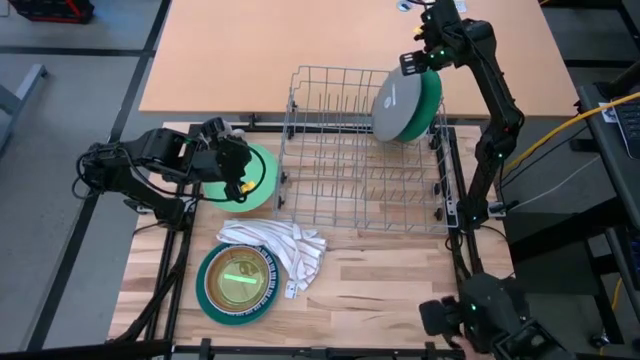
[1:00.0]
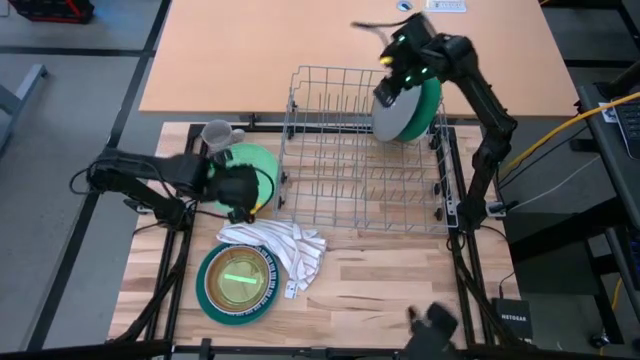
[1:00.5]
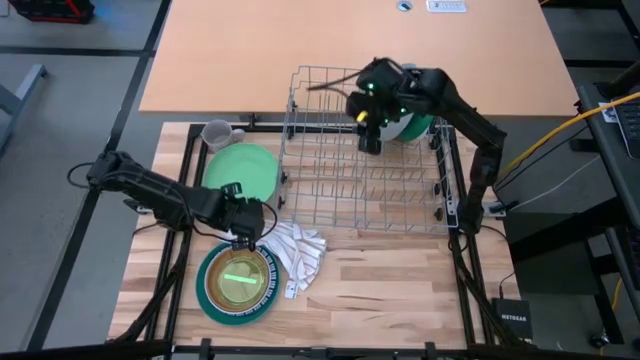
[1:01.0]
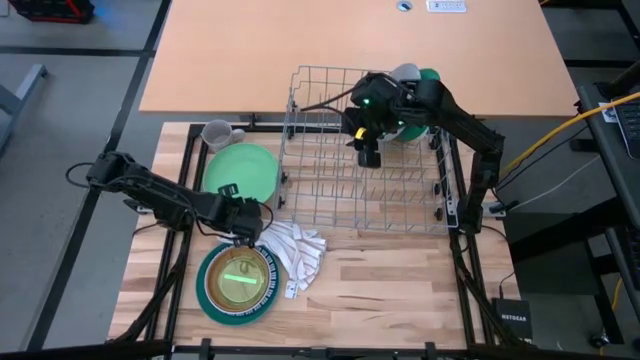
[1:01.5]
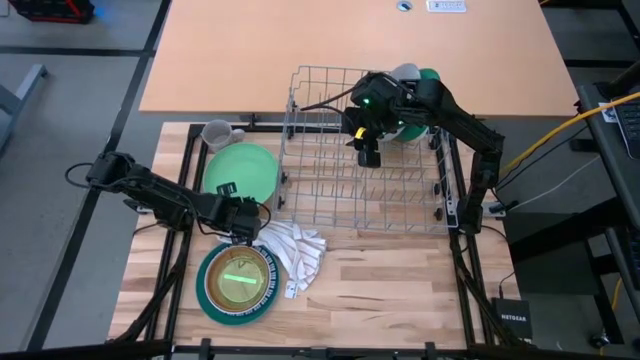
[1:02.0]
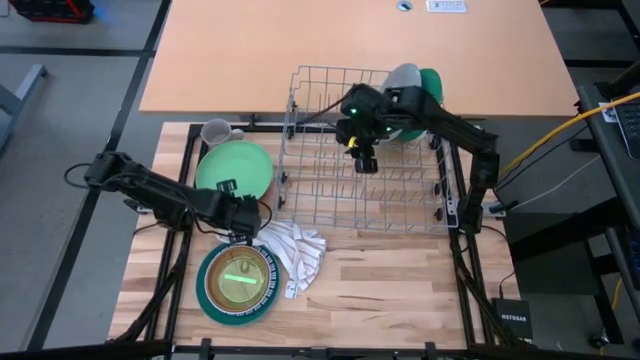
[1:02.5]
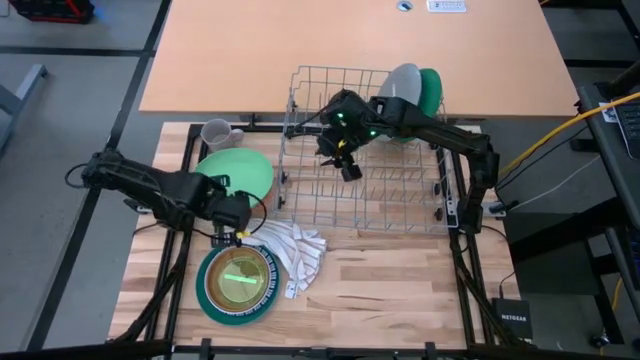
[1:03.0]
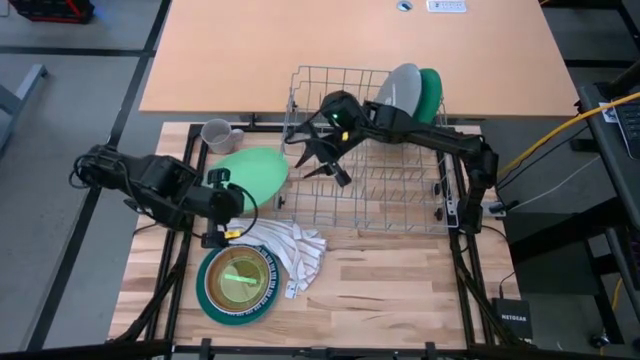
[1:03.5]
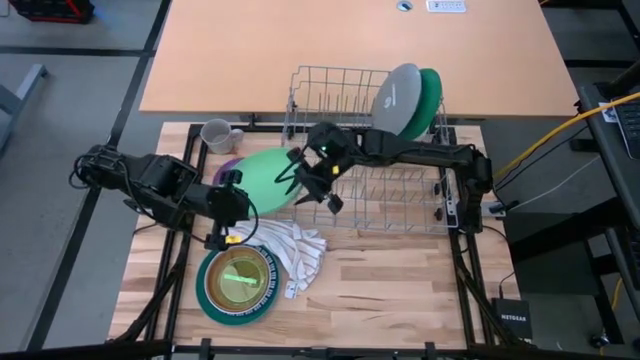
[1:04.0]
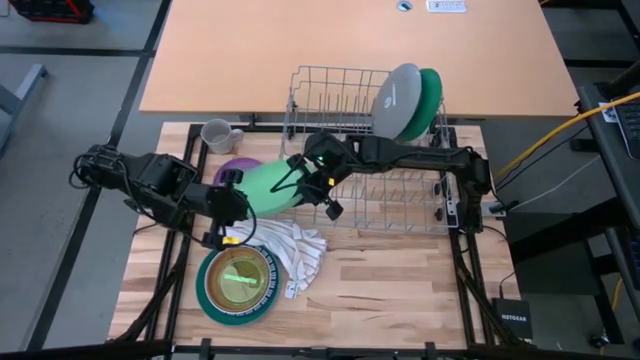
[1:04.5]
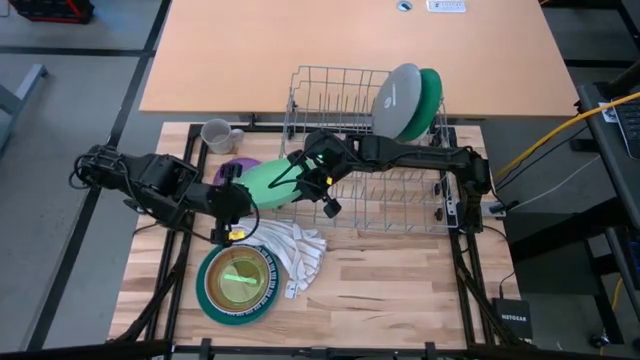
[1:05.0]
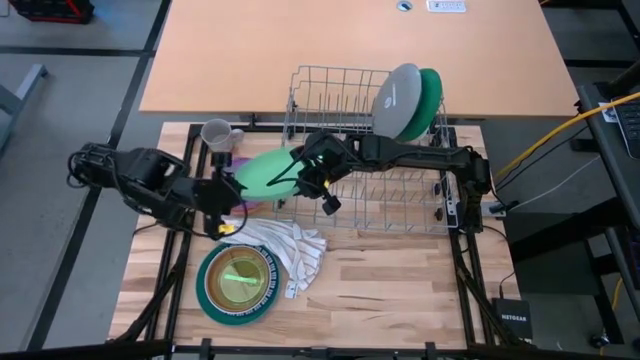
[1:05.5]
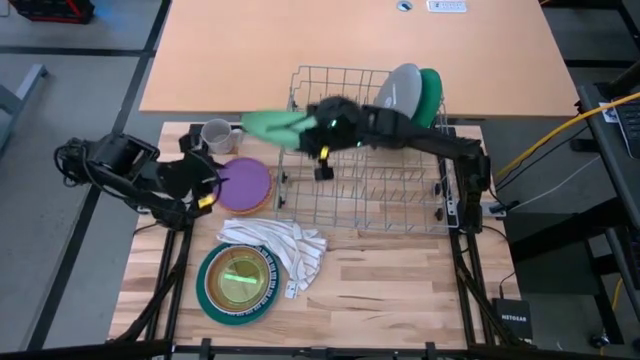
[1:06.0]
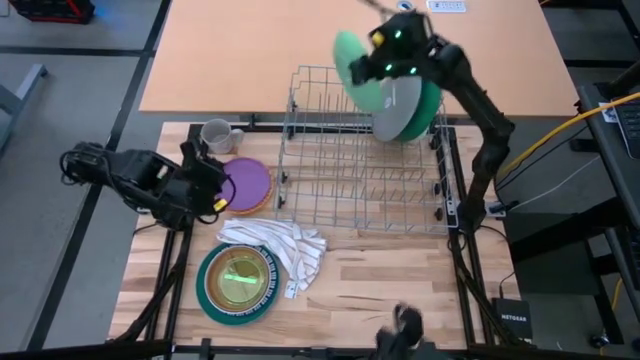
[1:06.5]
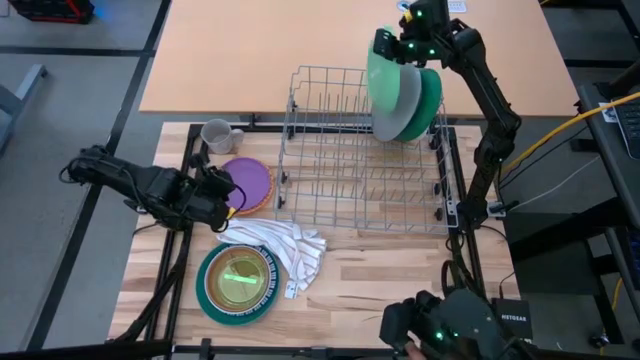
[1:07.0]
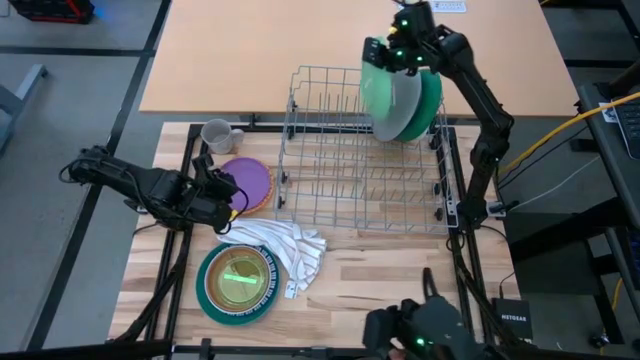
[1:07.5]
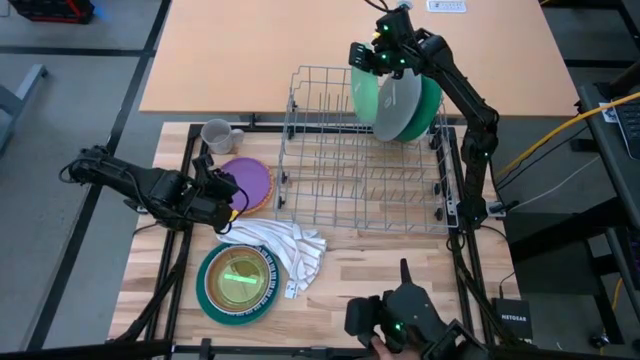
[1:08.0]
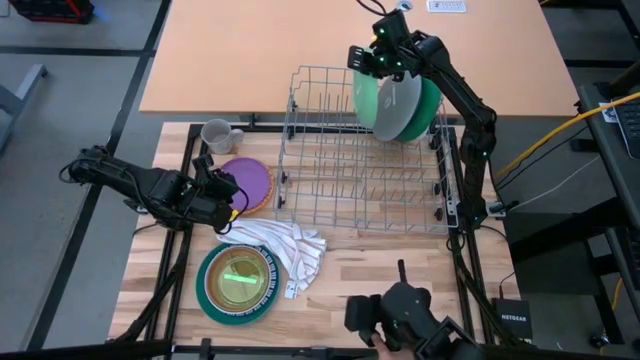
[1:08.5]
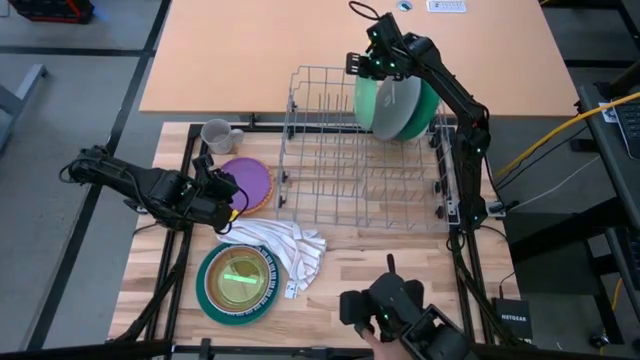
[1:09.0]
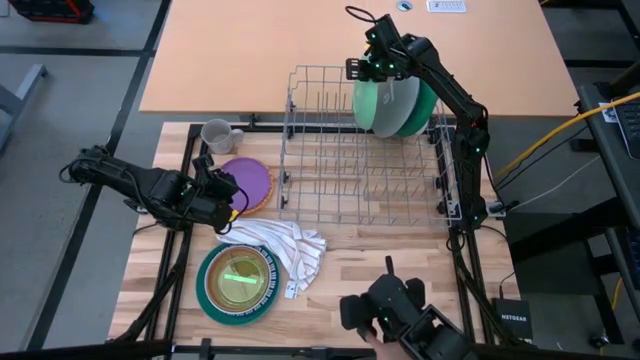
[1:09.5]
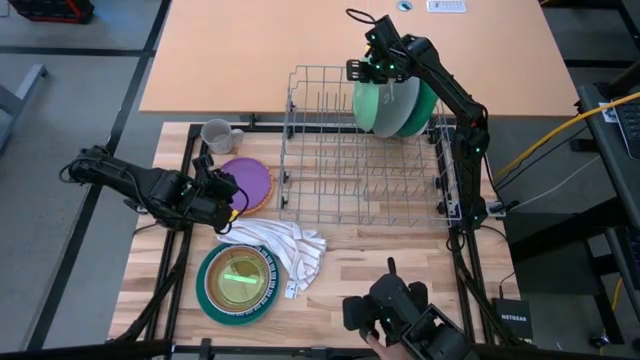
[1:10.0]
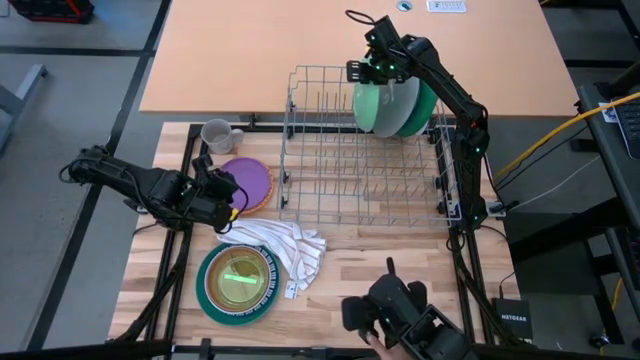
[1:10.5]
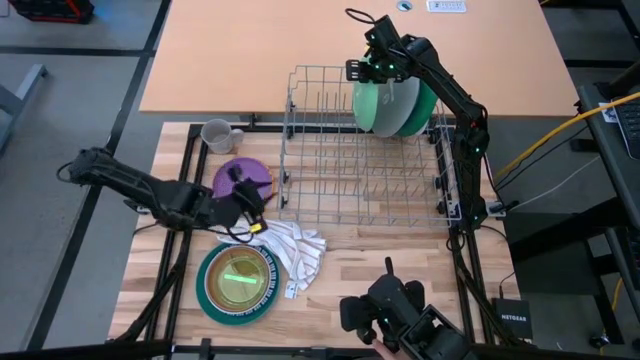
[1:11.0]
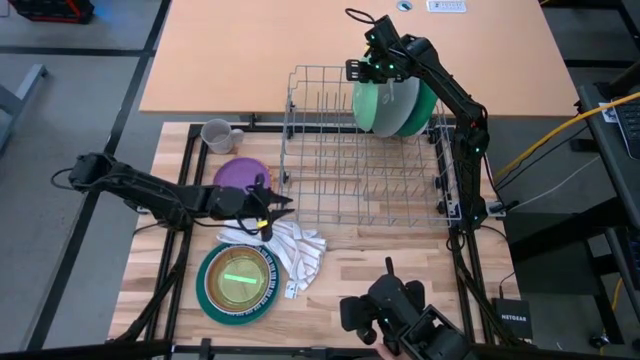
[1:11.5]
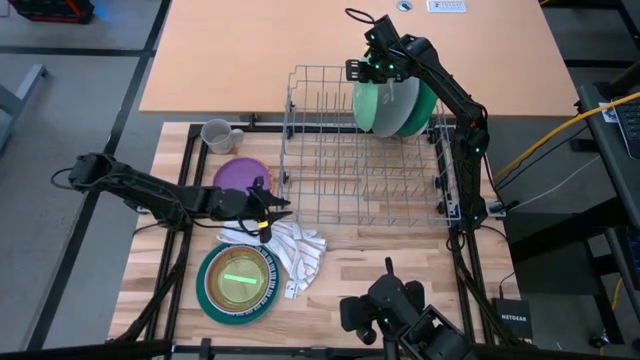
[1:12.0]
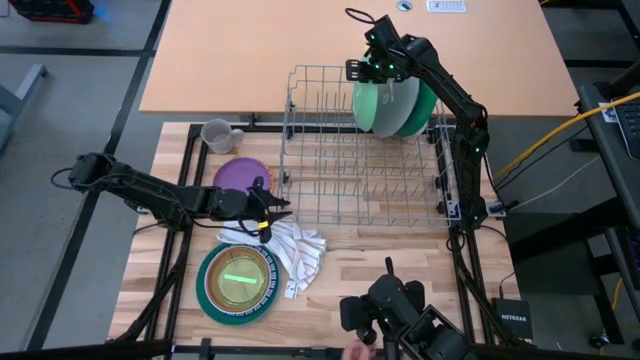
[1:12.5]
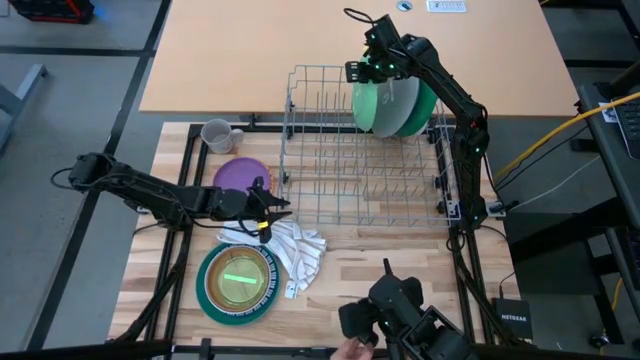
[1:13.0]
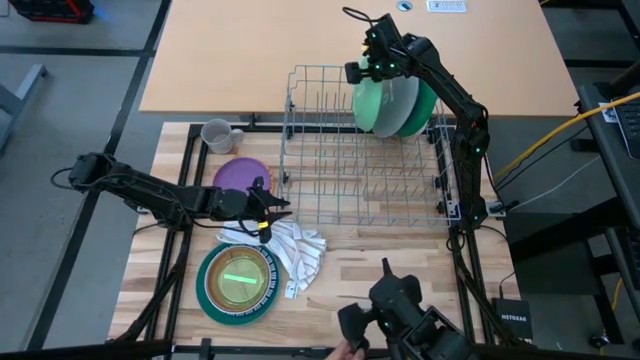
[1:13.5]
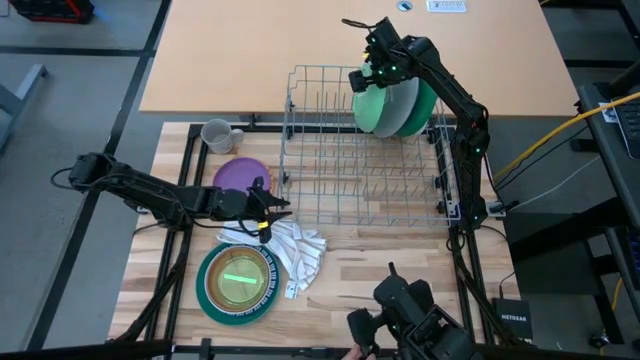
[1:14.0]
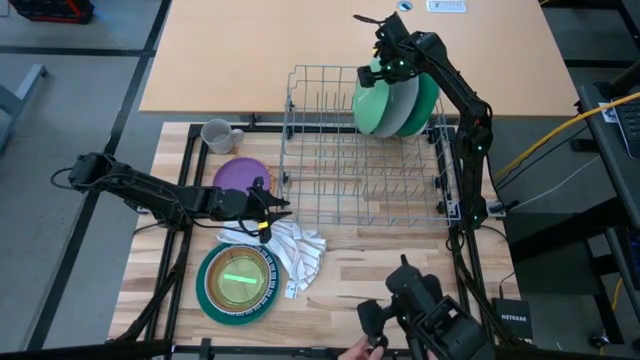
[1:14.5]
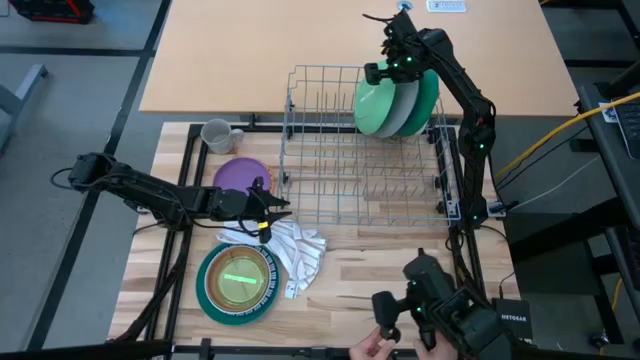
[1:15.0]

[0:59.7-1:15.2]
Task: Sort dishes
Put the light green plate into the dish rack

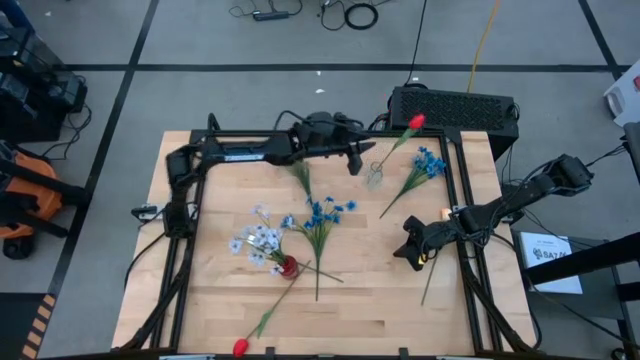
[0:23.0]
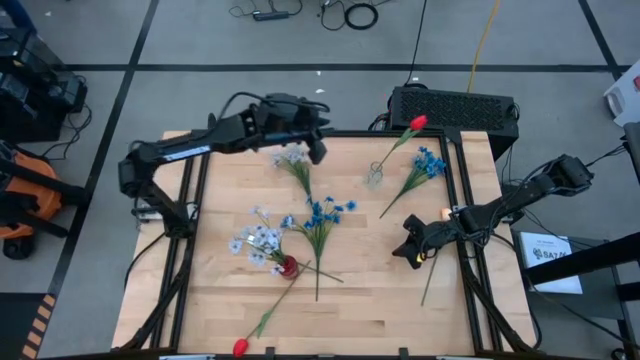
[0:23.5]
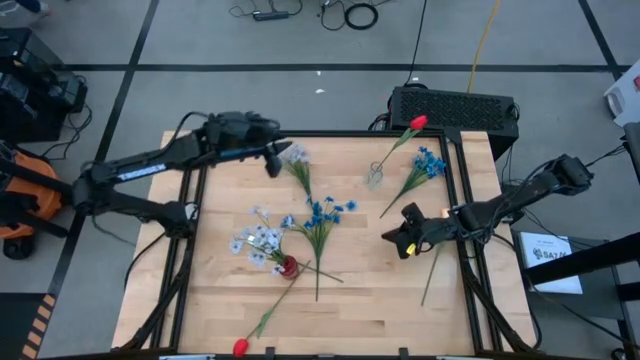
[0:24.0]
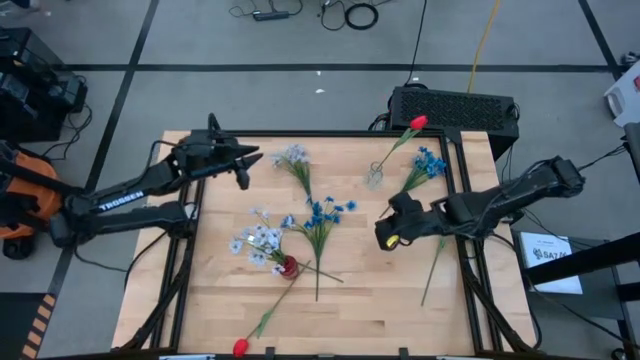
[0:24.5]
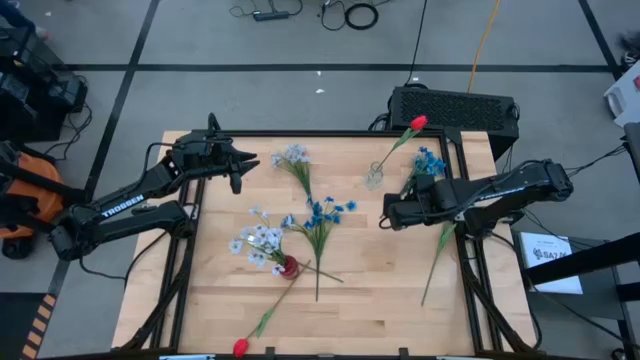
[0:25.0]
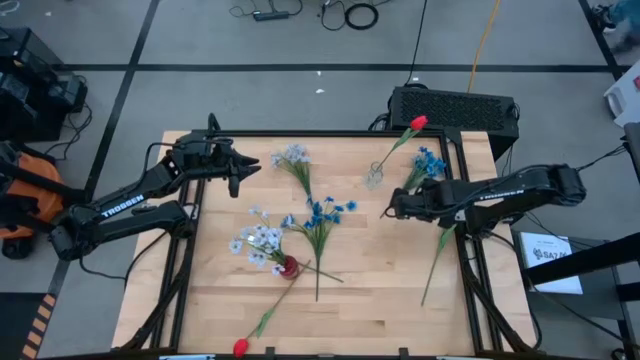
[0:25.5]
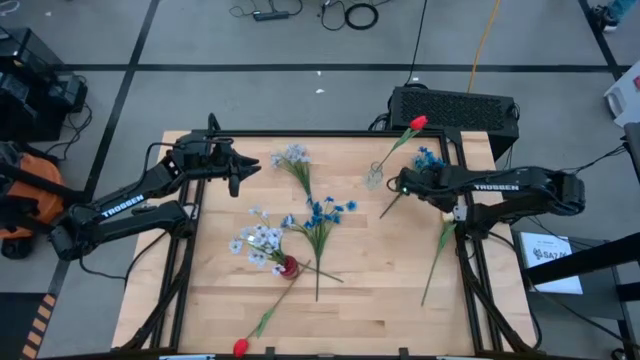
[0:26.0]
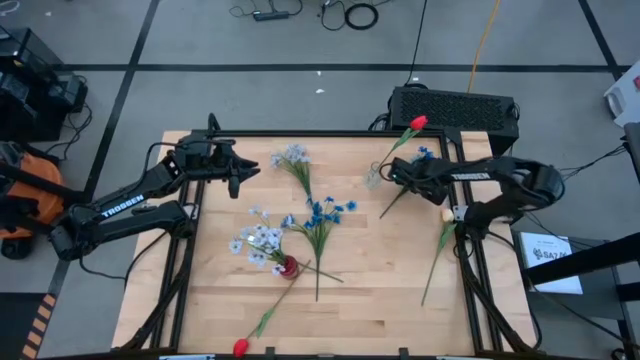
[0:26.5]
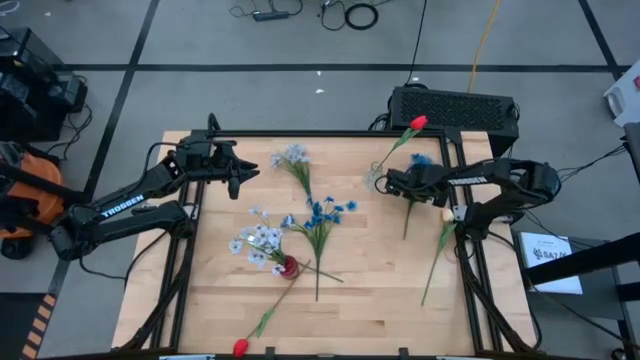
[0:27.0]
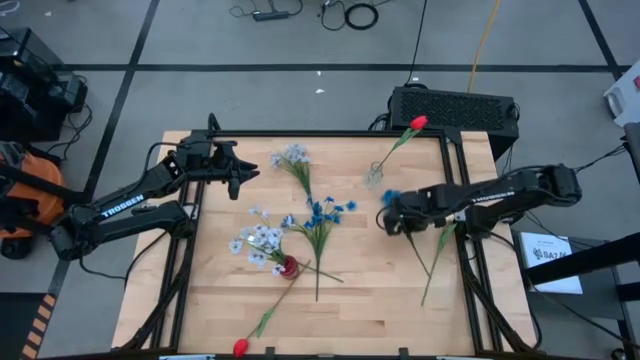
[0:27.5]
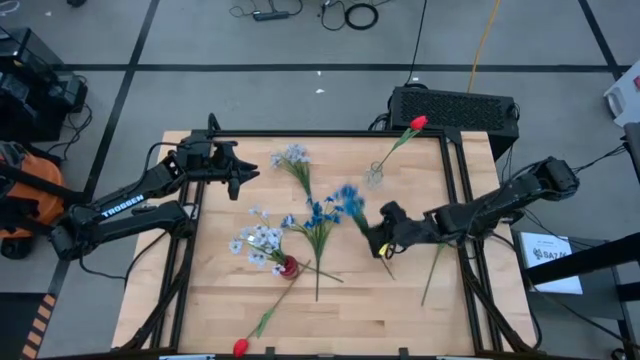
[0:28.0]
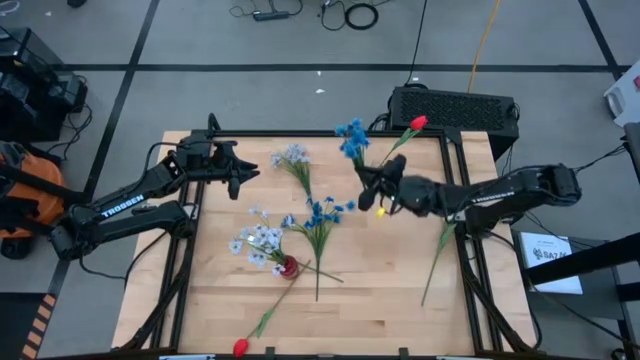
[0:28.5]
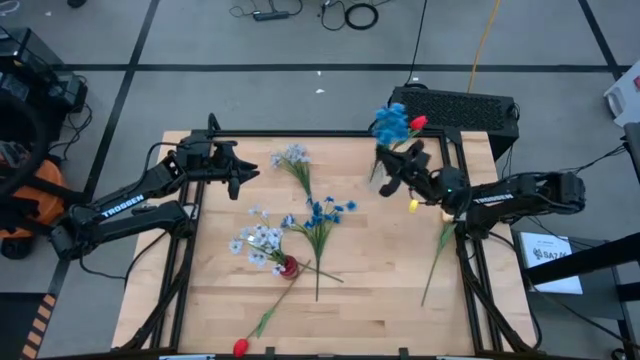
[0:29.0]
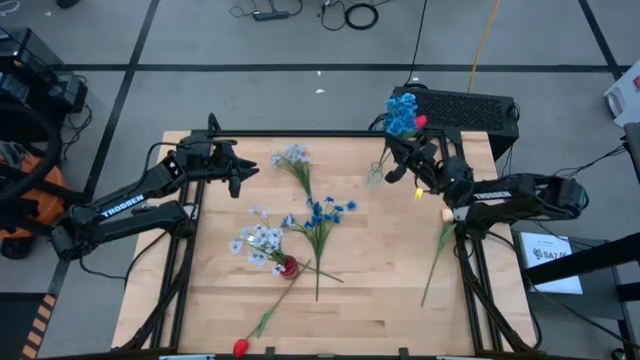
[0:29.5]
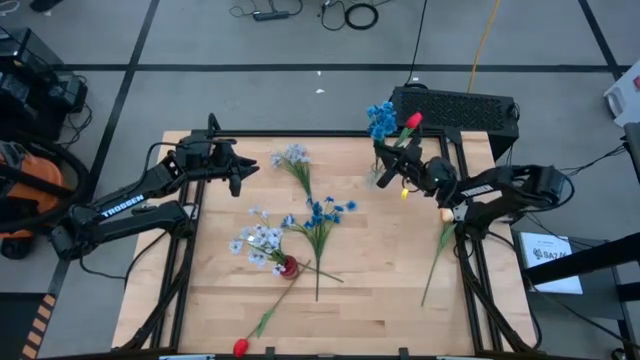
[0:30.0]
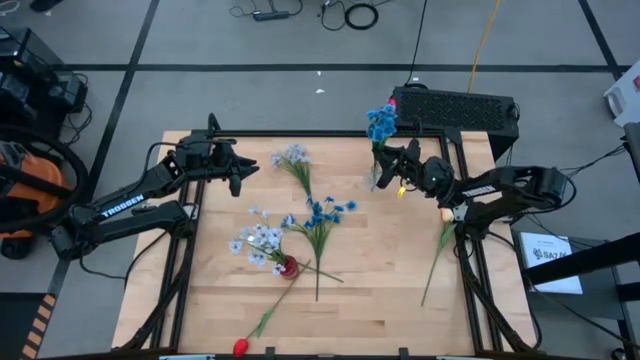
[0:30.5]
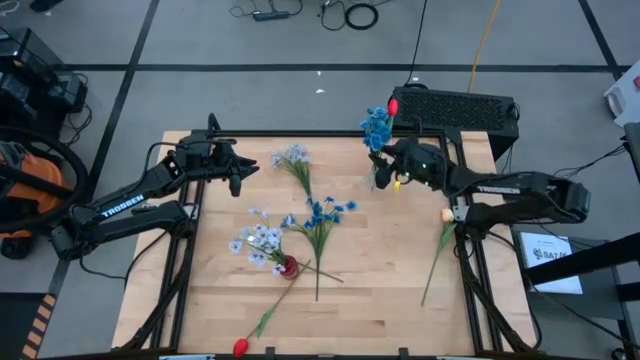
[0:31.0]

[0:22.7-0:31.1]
Task: Sort flowers into vase by color
Put the top blue flower into the transparent vase
